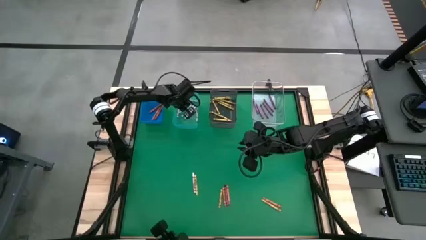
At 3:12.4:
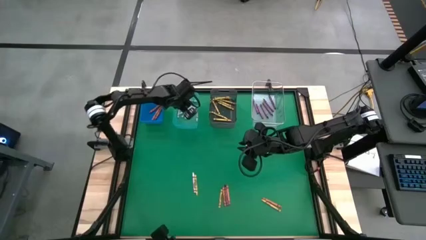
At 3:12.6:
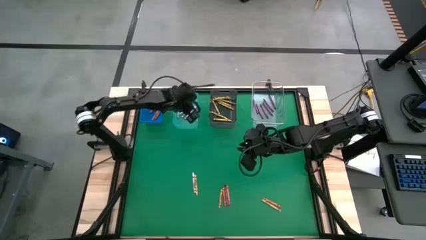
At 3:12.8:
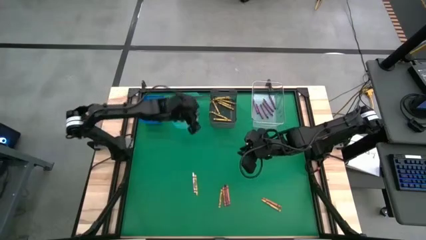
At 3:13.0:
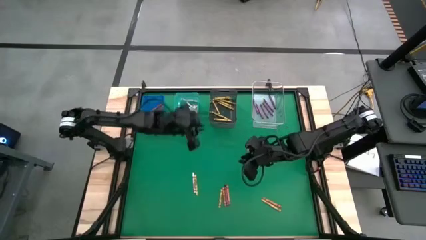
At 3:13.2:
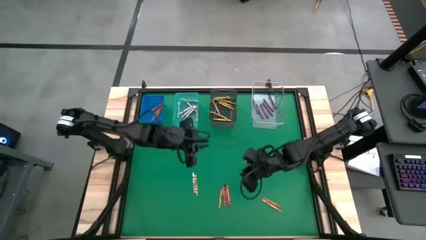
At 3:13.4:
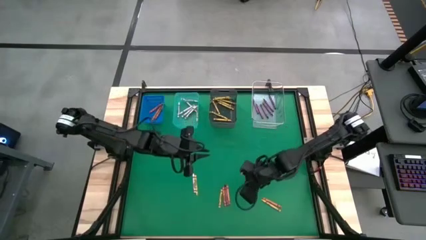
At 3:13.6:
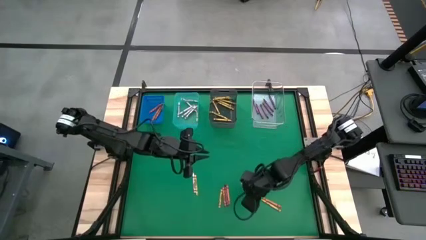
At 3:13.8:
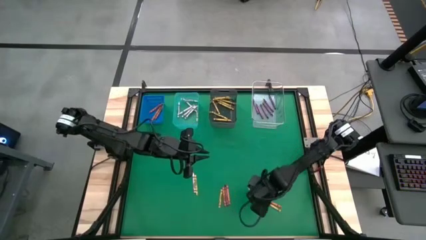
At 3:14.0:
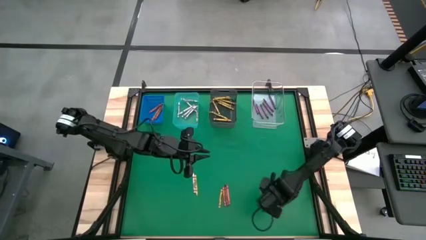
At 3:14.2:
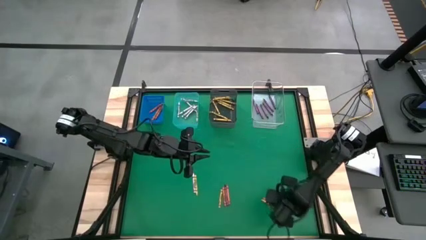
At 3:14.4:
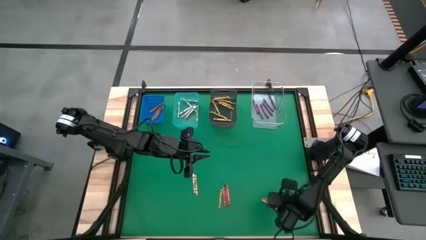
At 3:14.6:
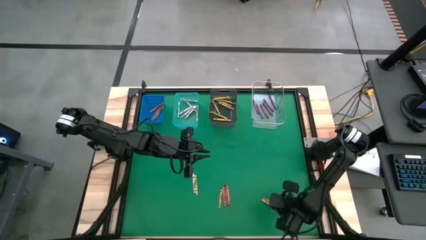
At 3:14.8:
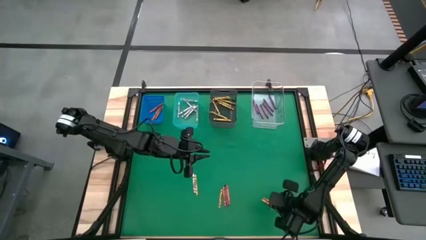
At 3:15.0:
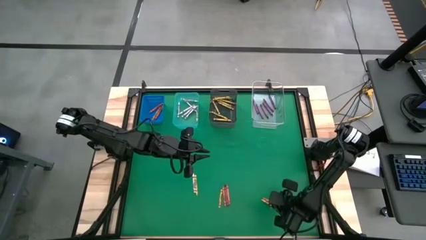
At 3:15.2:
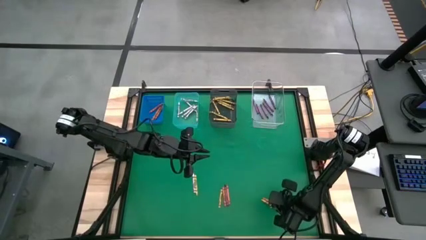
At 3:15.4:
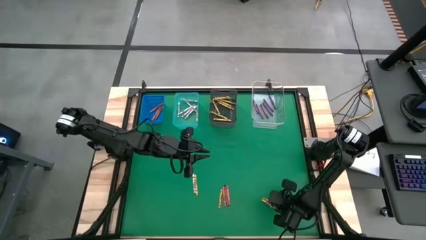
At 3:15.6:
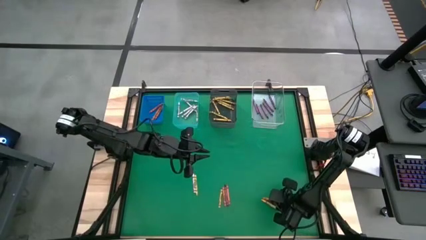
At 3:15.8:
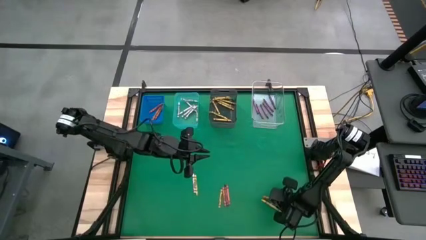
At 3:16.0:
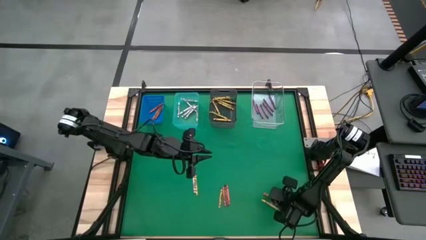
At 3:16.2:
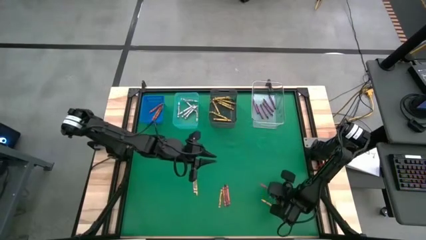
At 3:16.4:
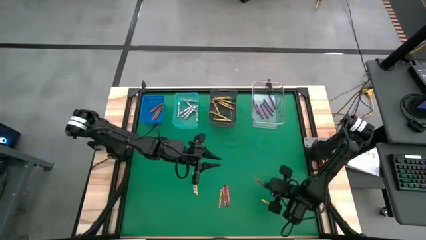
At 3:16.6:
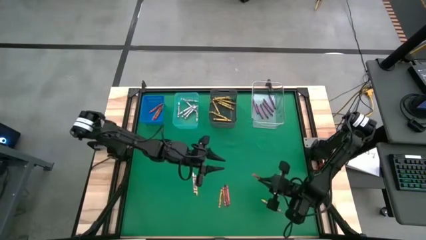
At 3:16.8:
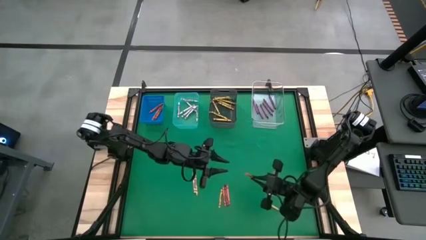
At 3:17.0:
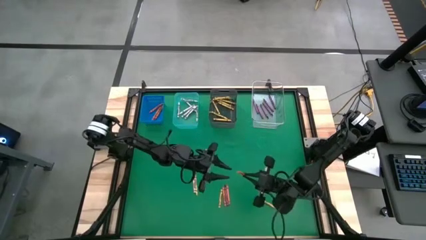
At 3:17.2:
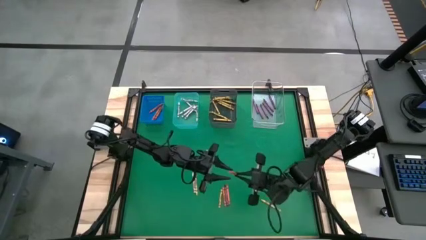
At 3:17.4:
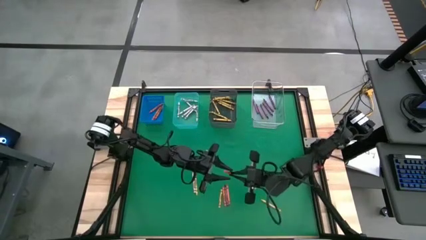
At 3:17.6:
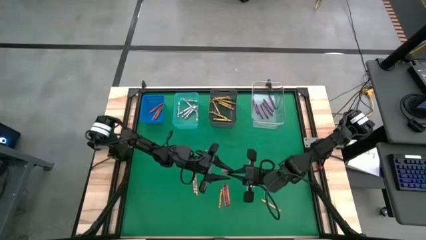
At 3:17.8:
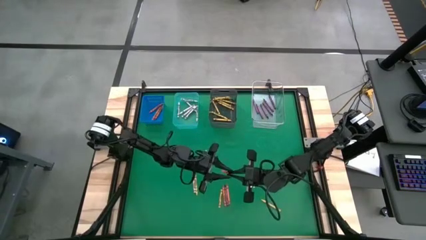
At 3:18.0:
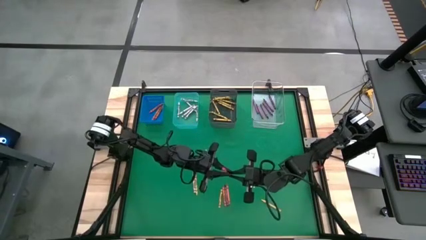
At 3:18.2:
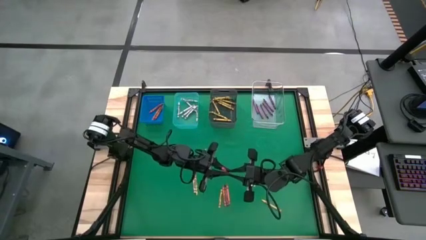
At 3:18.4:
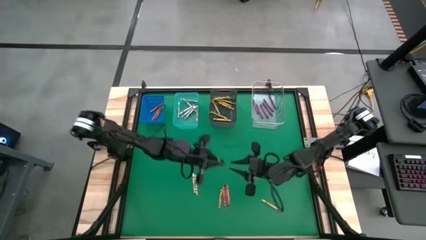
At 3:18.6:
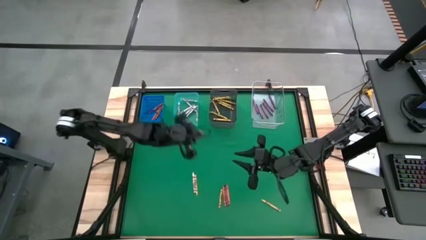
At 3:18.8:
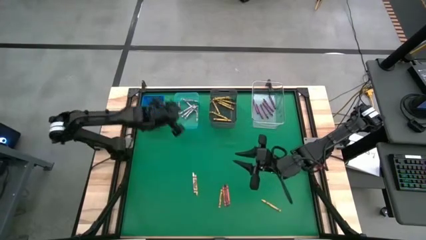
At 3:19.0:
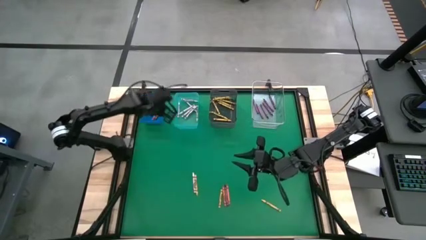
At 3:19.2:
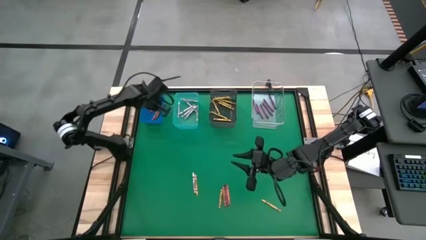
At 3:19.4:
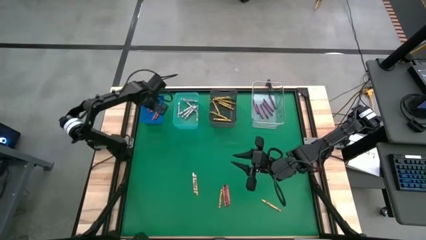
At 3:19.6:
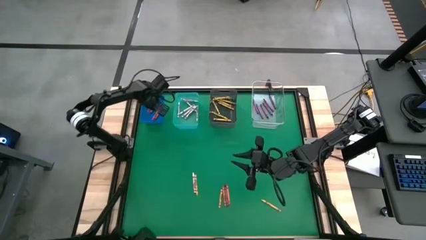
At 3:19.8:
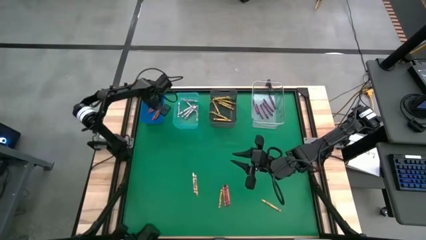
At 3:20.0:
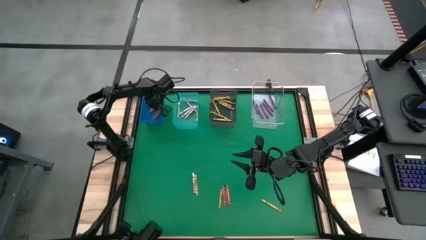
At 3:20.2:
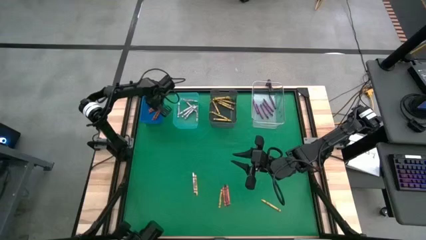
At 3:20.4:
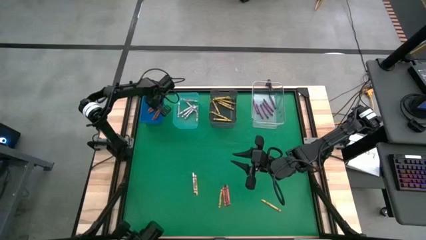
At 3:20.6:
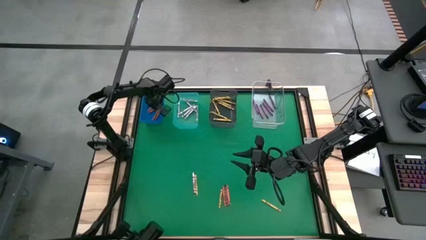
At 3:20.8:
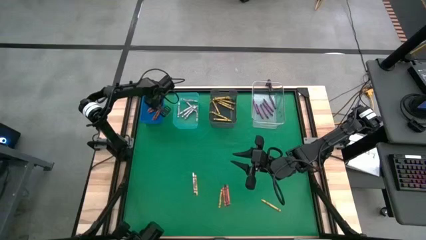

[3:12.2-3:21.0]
Task: Sort crayons
Put the red crayon into the blue bin

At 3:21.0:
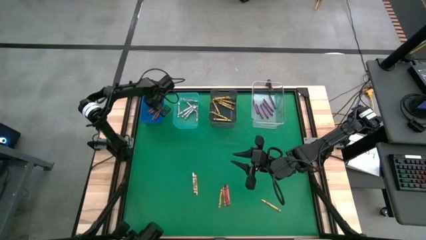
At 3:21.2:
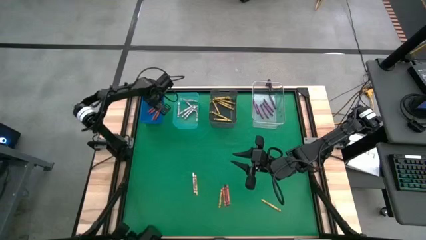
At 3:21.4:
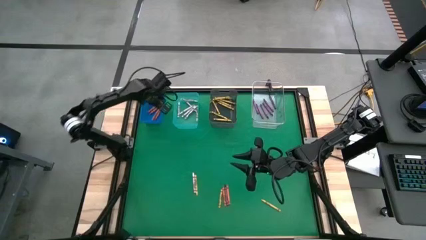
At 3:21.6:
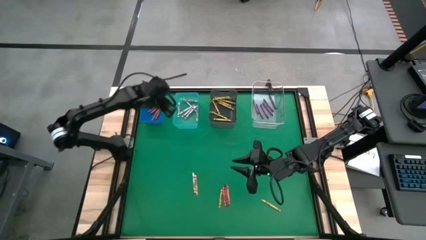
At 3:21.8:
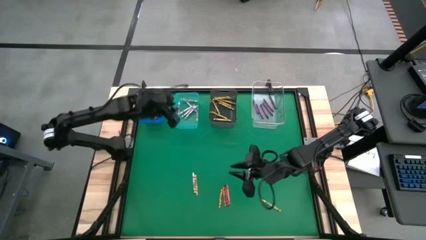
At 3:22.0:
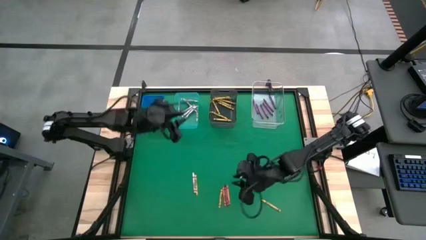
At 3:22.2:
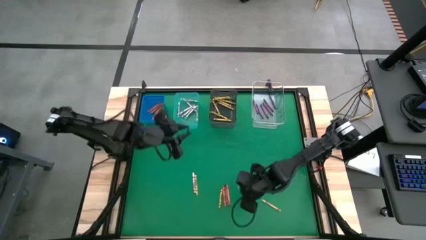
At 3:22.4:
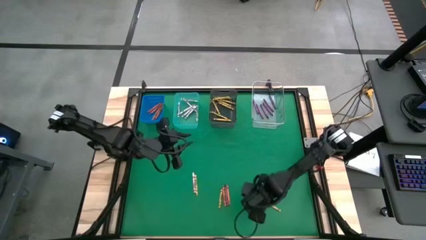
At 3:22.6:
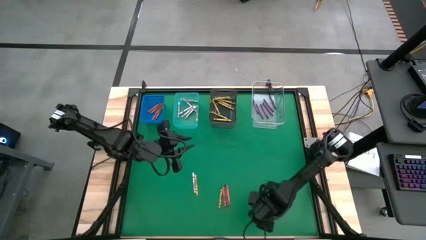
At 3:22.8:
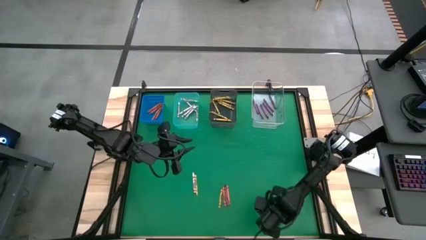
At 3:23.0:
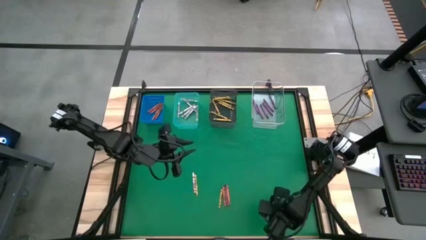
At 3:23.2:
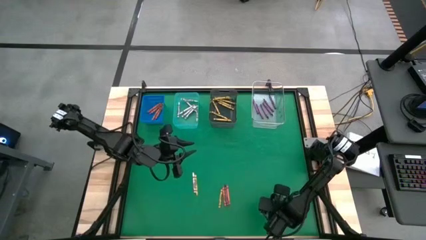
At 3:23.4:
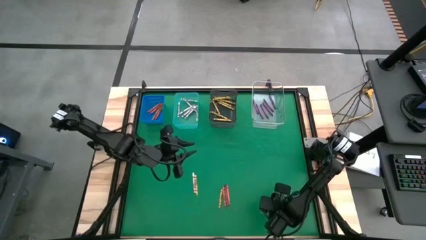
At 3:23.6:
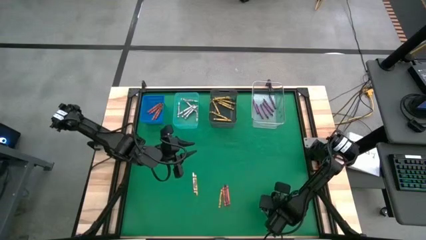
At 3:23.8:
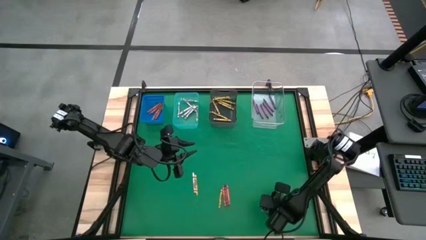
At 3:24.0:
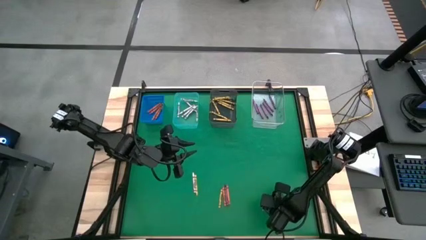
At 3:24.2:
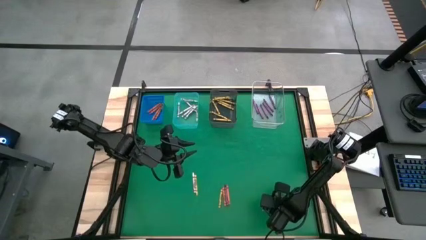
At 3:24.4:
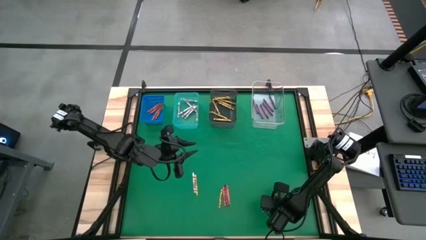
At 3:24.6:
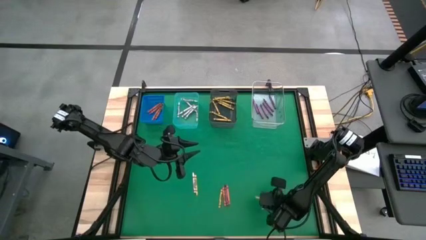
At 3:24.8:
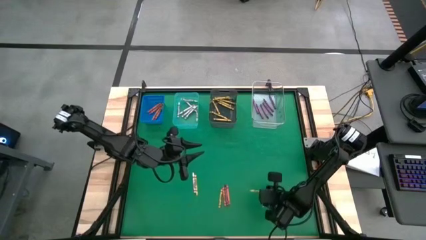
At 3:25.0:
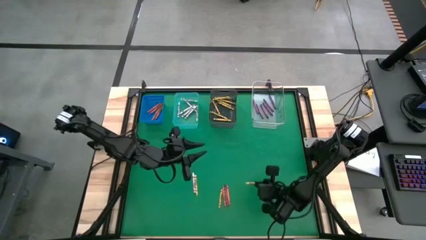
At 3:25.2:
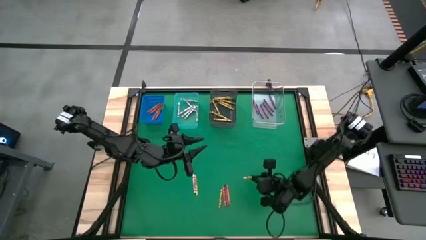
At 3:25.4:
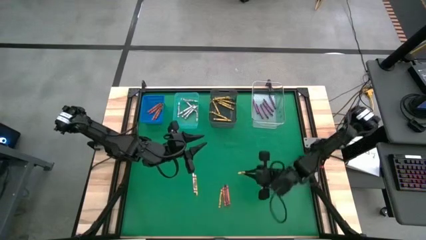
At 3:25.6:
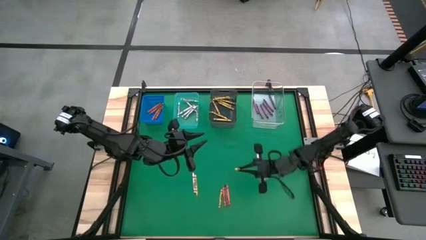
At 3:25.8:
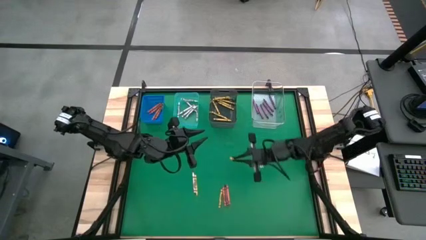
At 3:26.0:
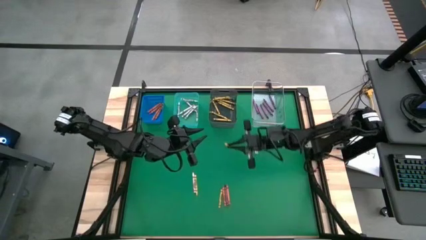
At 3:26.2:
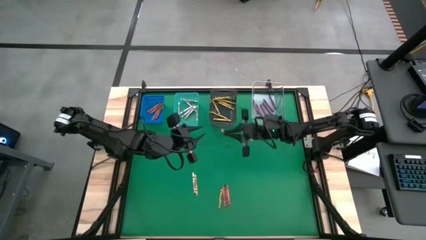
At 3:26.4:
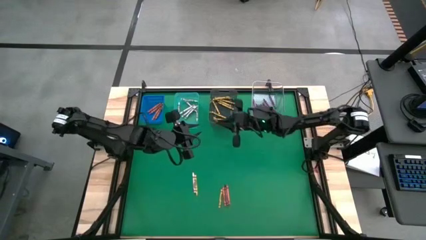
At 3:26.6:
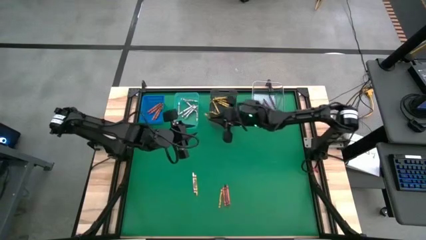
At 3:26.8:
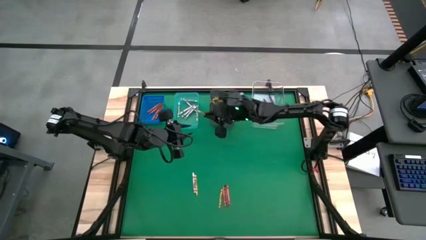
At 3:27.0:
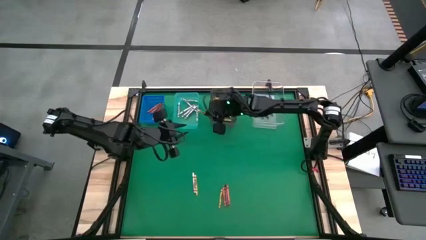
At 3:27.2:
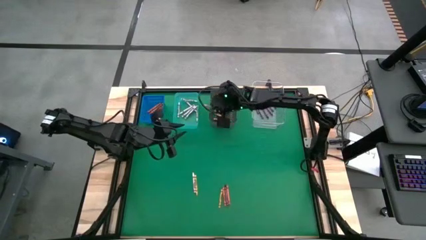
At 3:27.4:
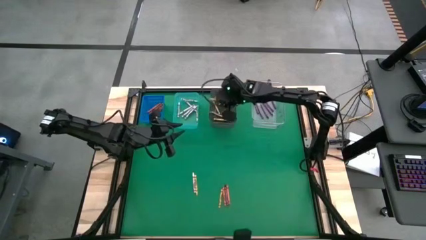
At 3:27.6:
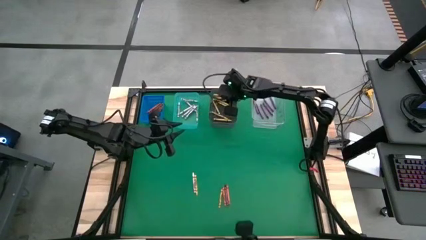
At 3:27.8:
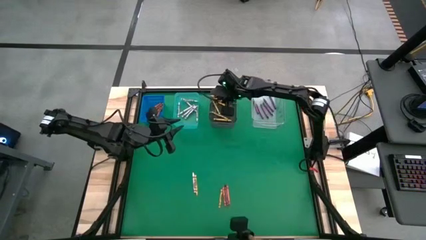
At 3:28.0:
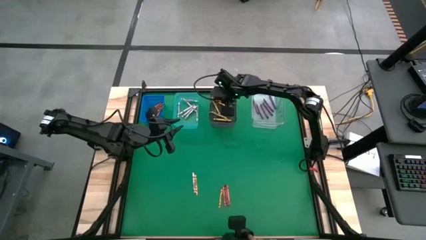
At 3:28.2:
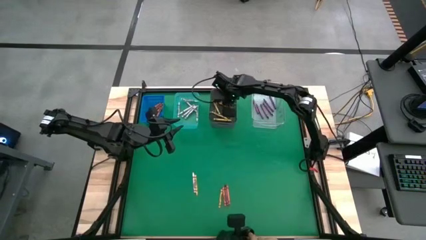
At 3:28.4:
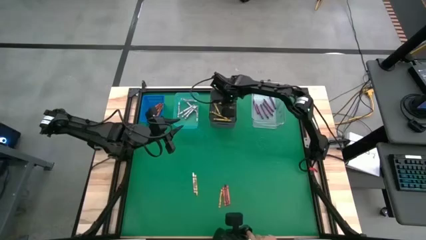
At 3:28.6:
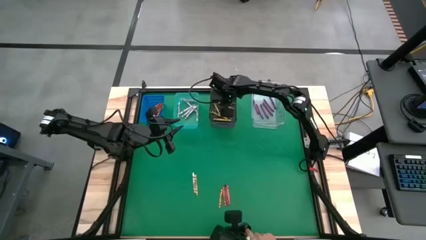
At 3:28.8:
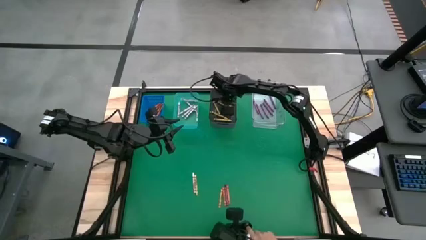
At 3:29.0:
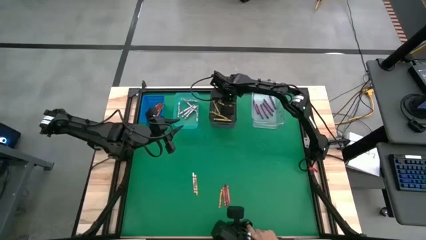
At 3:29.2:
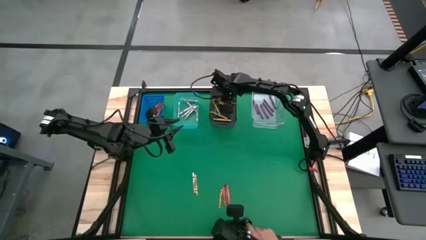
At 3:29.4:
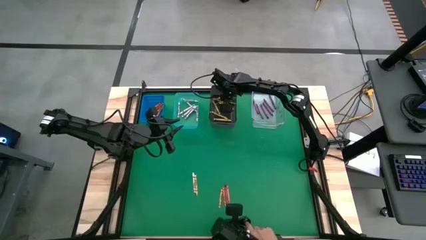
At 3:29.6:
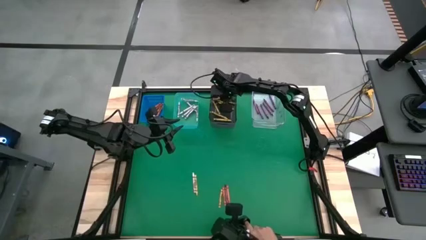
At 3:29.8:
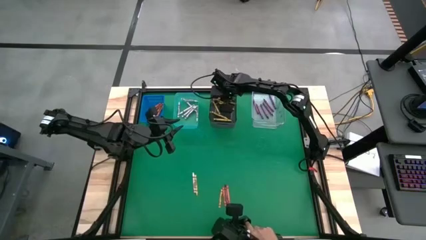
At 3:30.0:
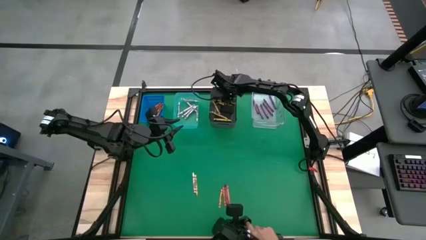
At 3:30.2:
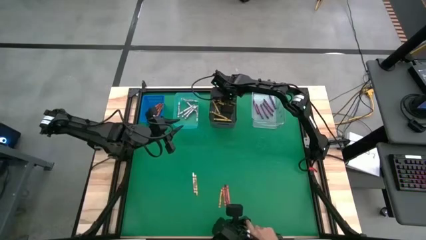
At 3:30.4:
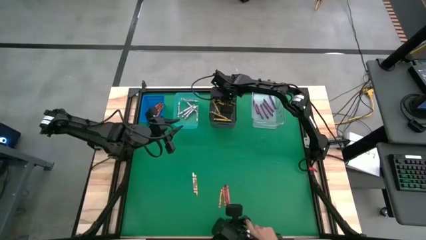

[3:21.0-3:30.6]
Put the yellow crayon into the black bin
